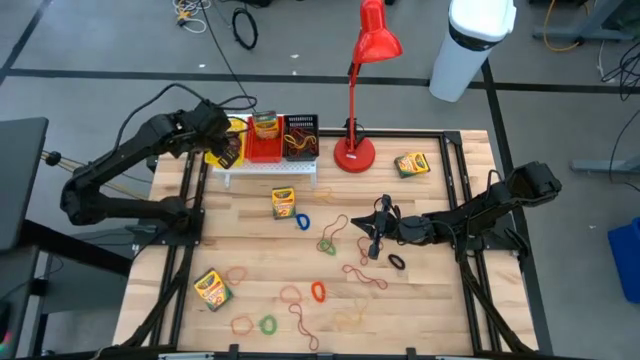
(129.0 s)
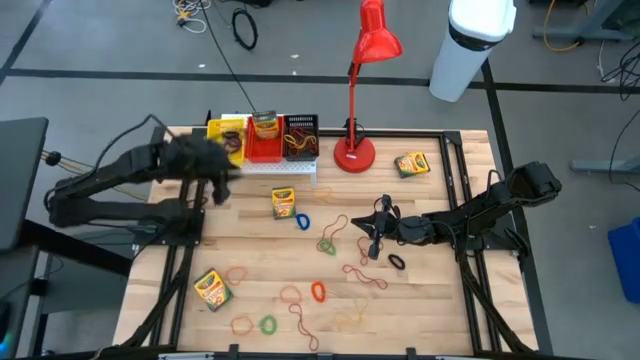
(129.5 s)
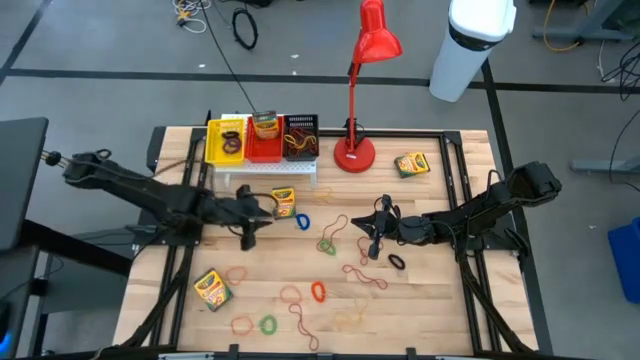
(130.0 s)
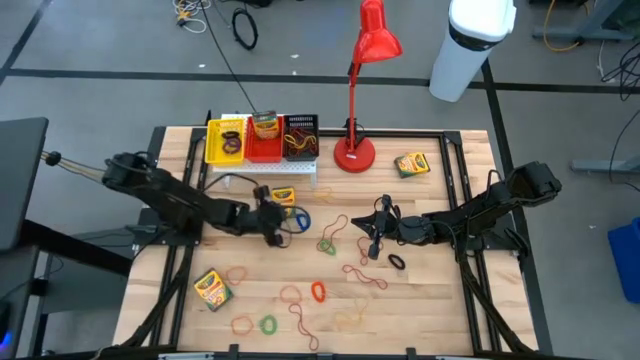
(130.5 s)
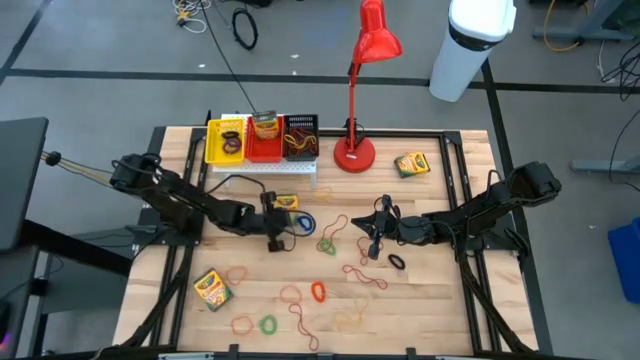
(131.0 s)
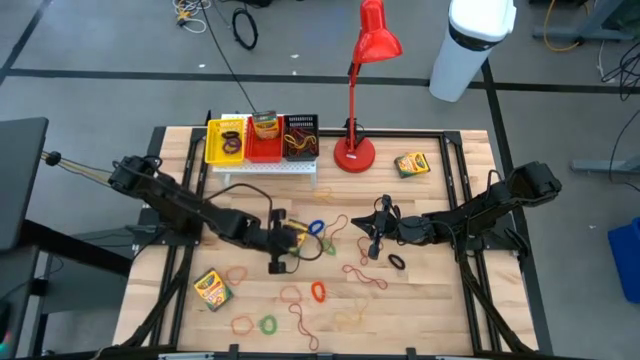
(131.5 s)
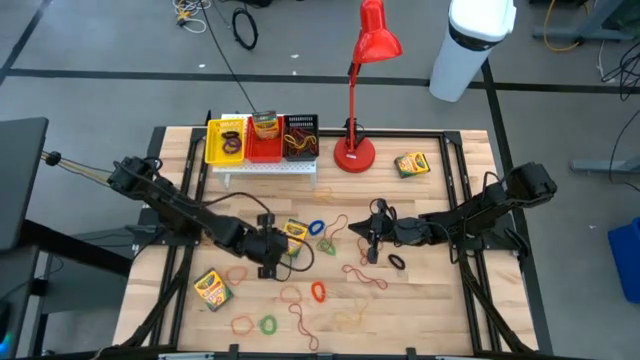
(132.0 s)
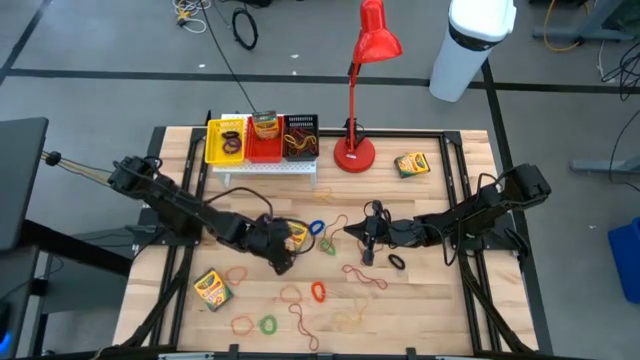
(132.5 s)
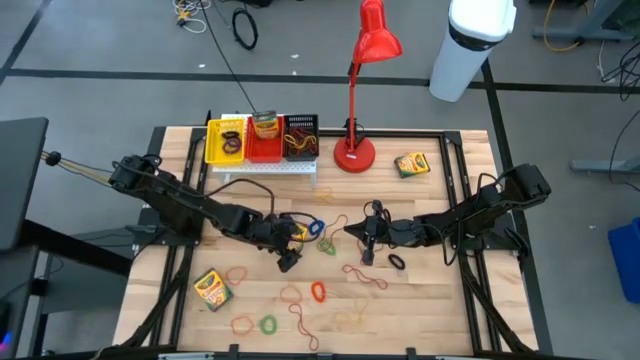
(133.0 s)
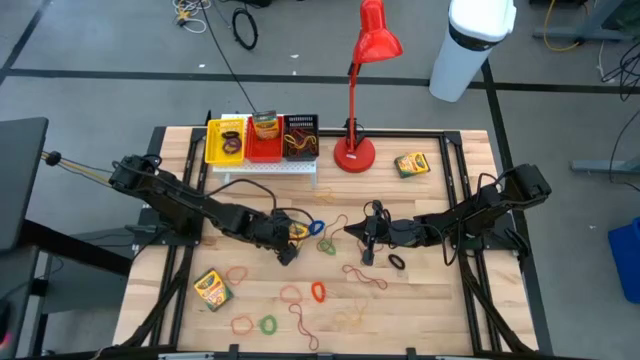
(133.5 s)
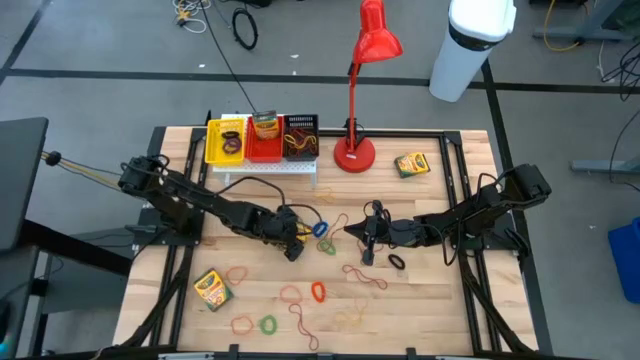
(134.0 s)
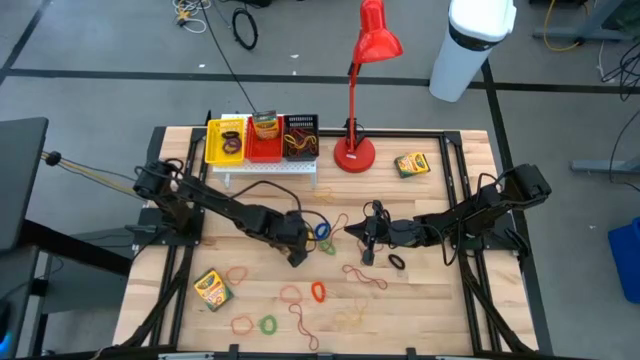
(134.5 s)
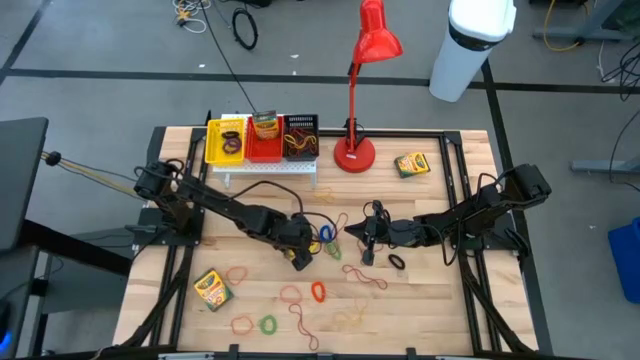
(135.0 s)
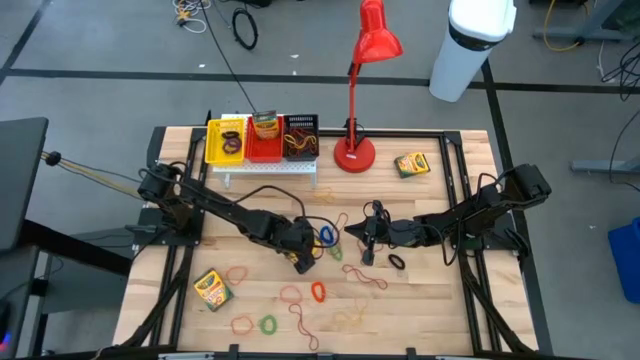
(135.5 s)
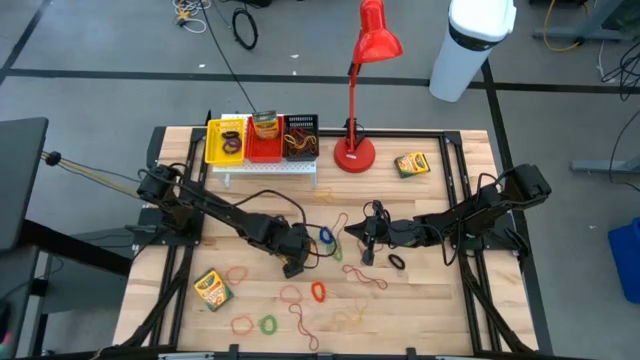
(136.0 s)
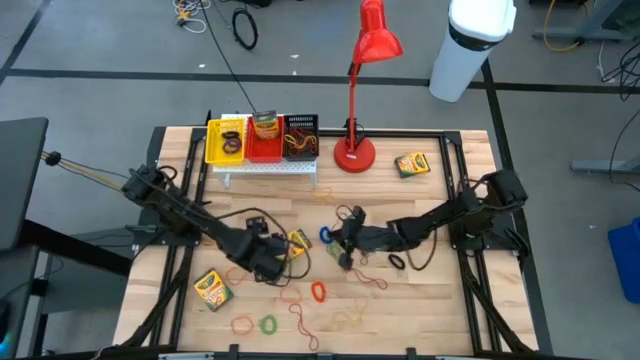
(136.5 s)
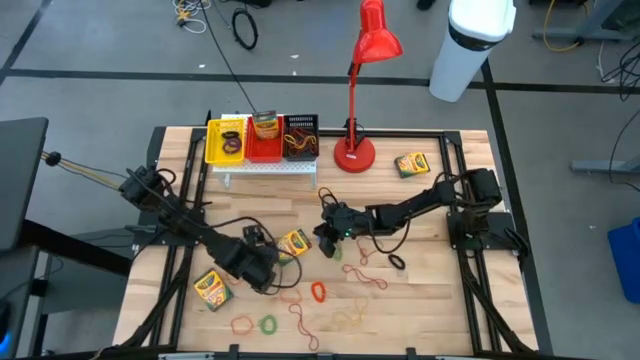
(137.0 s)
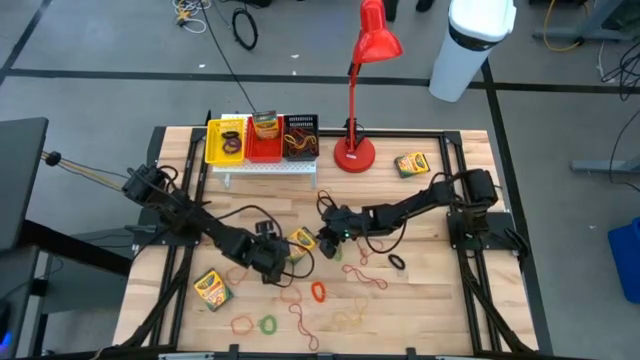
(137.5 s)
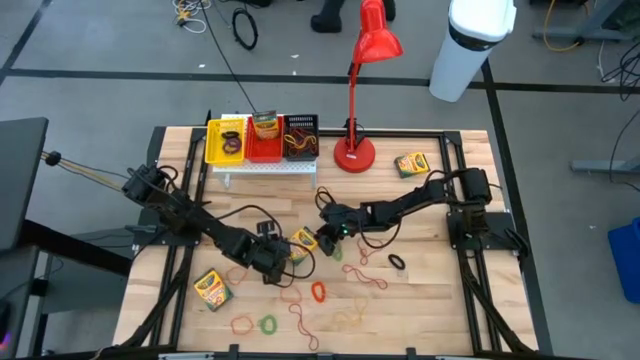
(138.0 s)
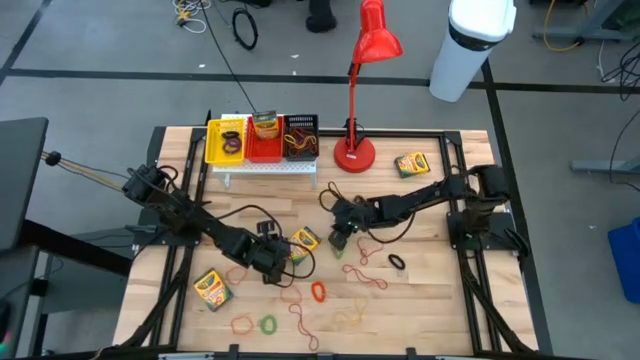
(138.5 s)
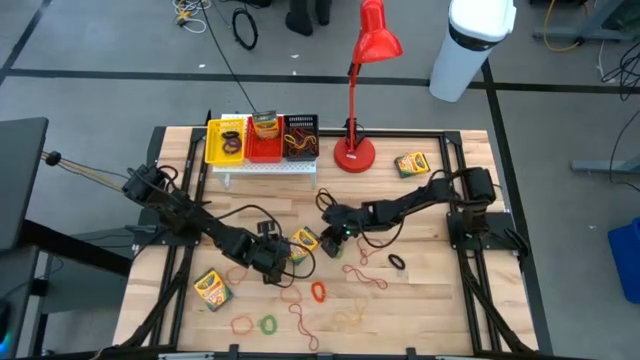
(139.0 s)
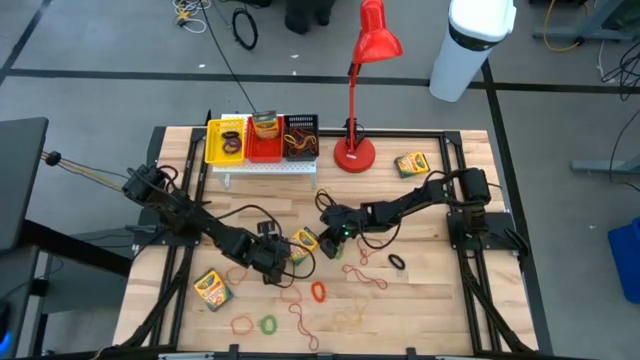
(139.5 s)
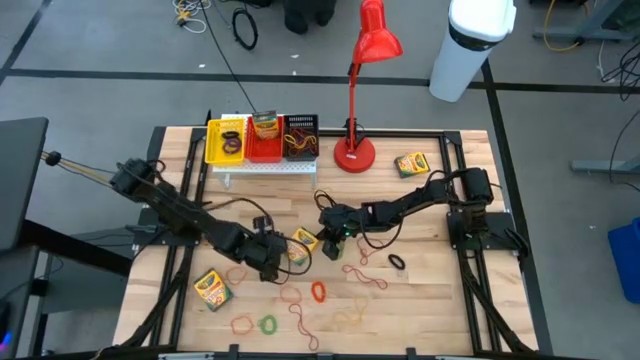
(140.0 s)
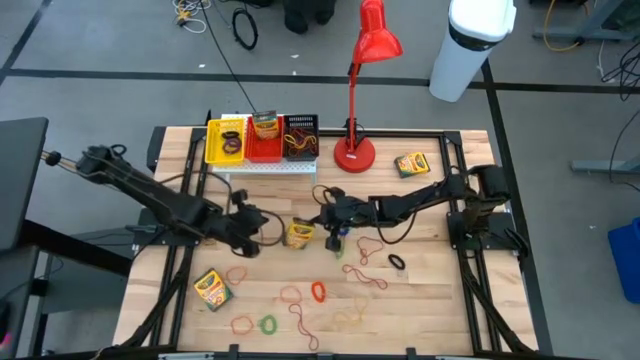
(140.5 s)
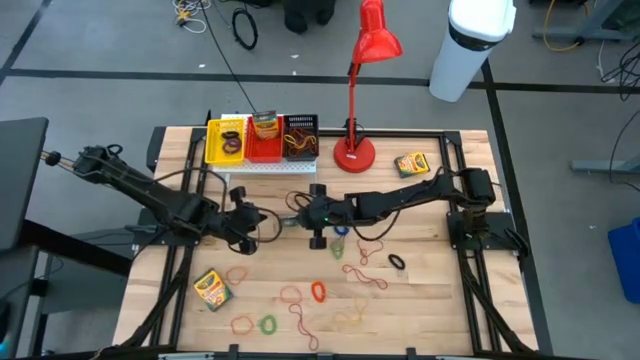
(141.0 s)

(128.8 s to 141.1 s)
Task: Pick & Place Office Desk Supplies
Put the crayon box into the red bin on the shelf

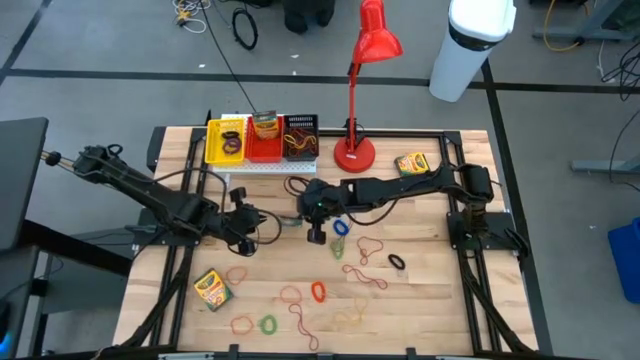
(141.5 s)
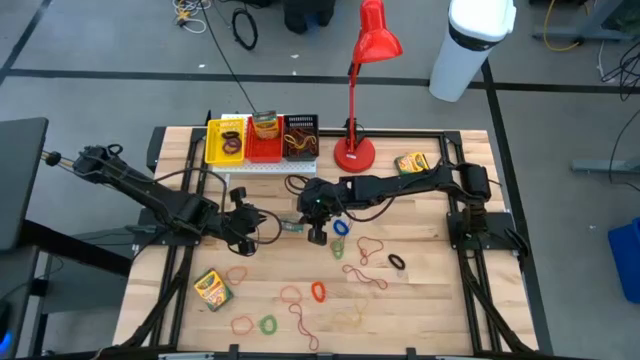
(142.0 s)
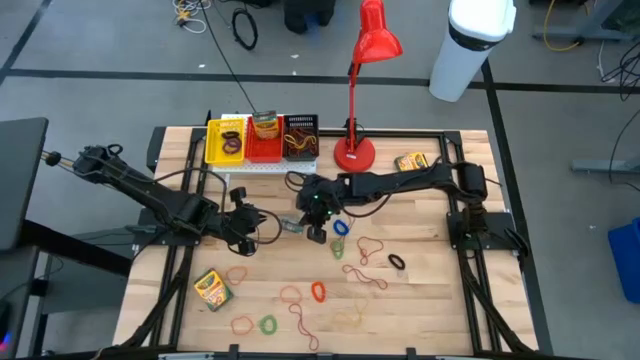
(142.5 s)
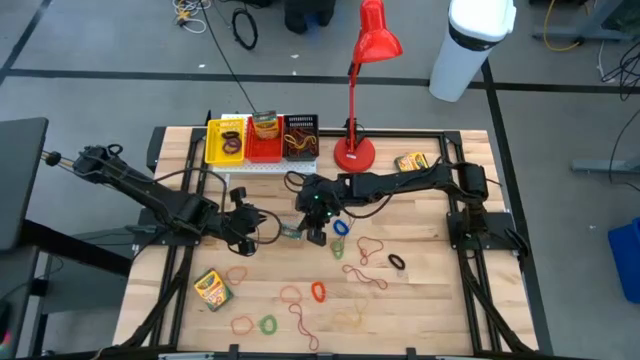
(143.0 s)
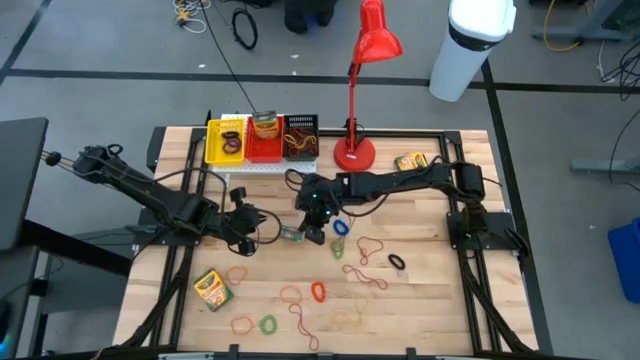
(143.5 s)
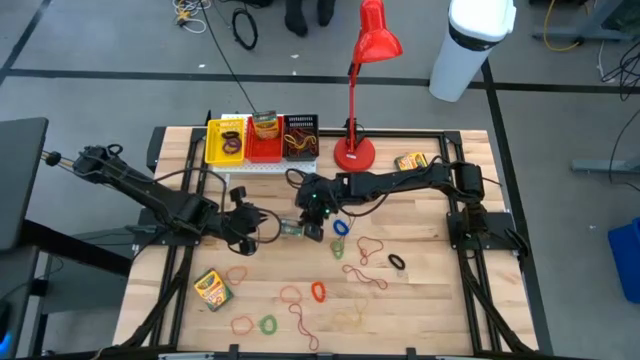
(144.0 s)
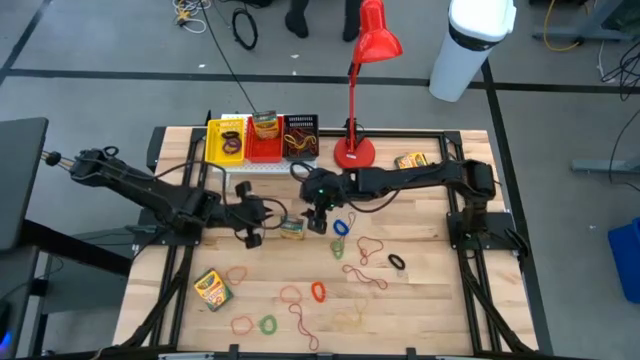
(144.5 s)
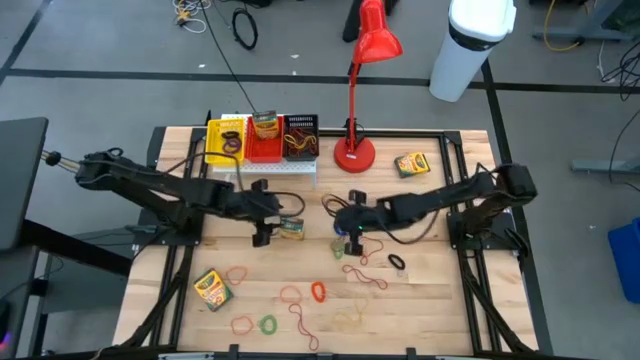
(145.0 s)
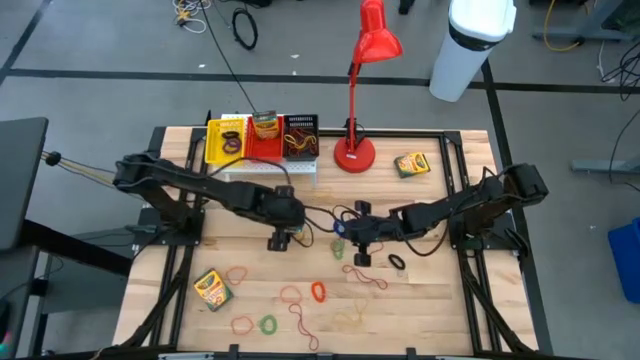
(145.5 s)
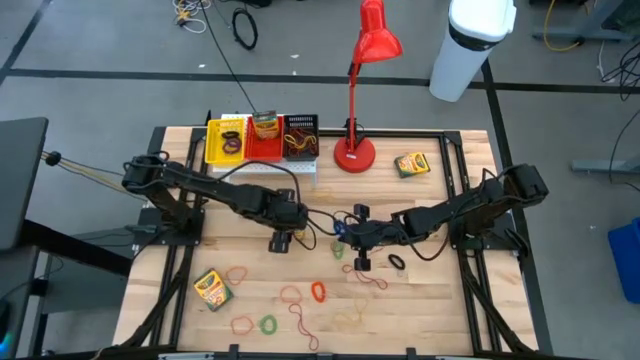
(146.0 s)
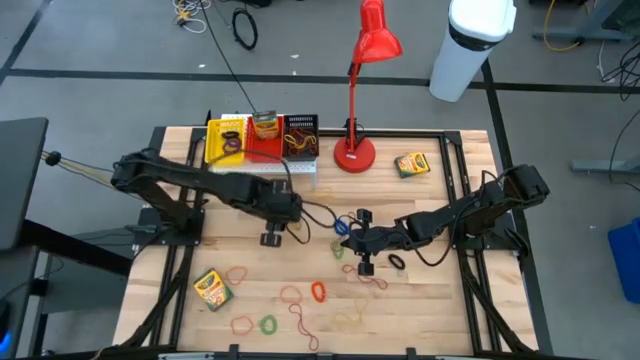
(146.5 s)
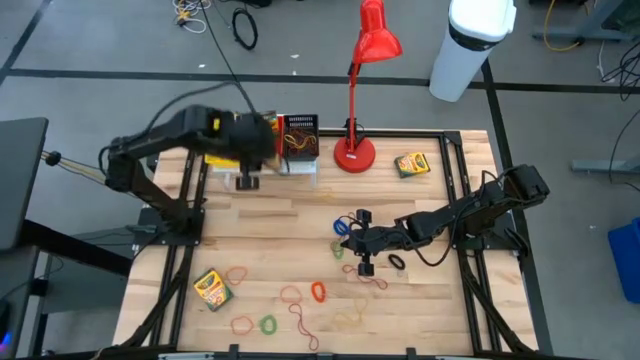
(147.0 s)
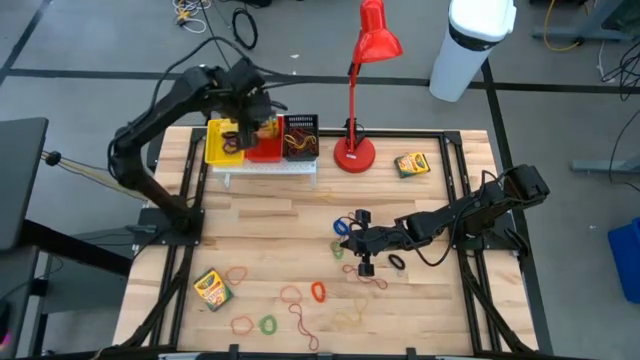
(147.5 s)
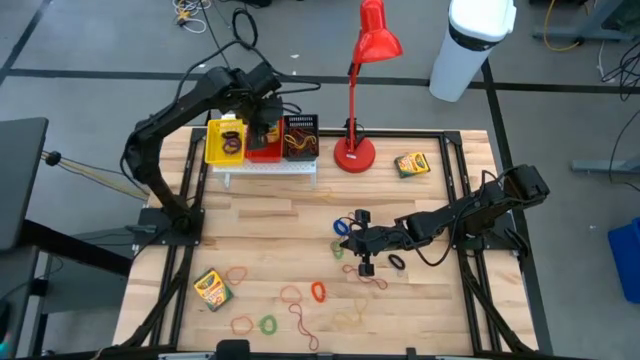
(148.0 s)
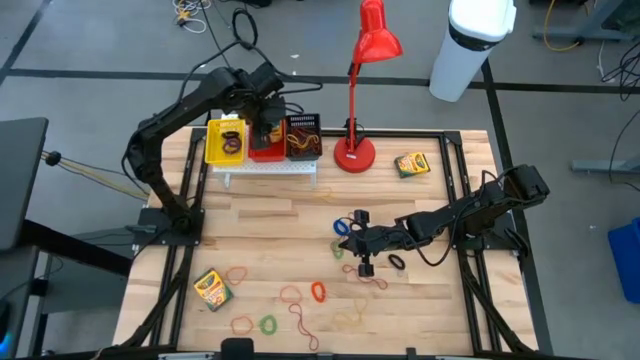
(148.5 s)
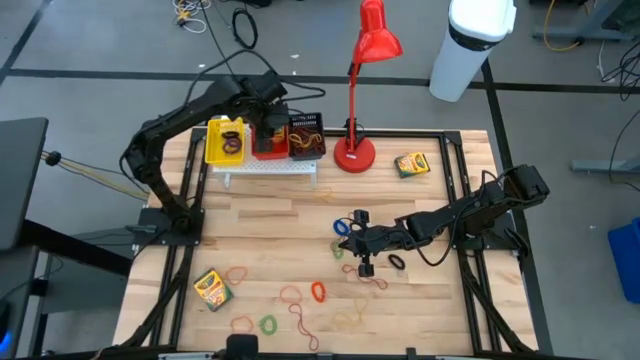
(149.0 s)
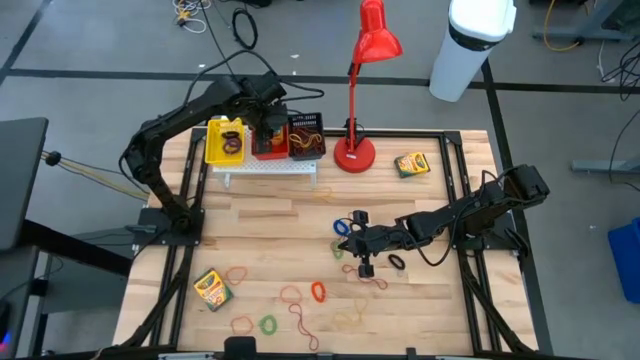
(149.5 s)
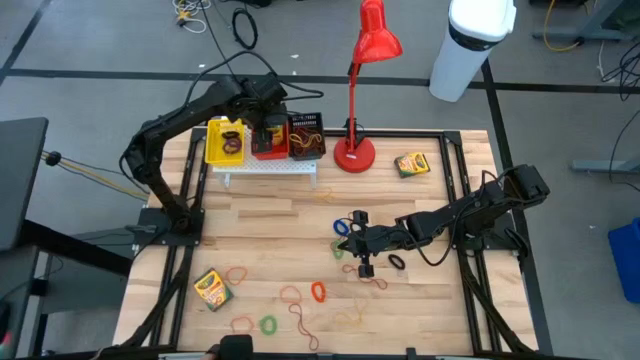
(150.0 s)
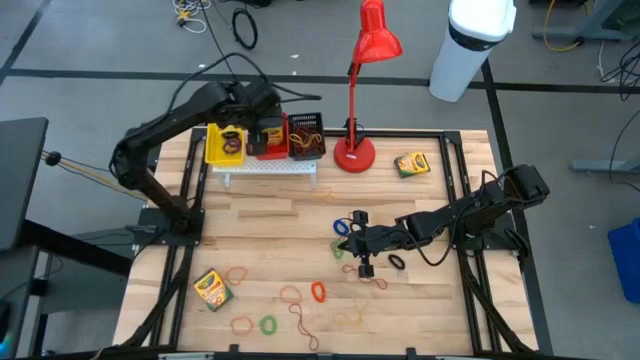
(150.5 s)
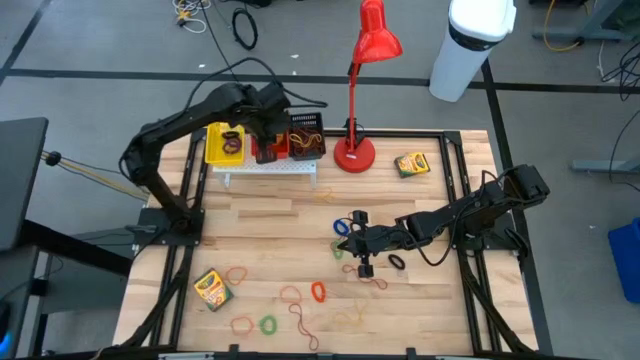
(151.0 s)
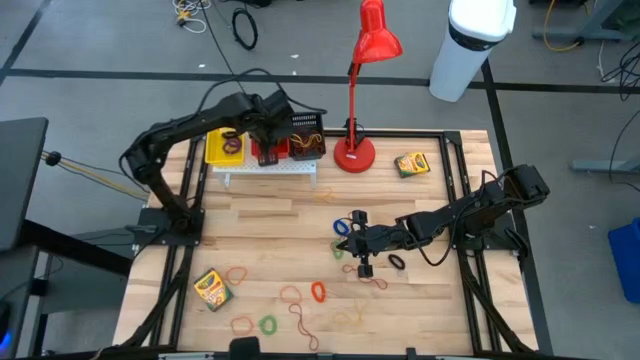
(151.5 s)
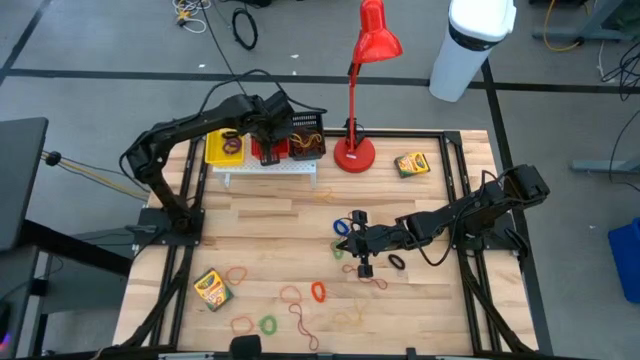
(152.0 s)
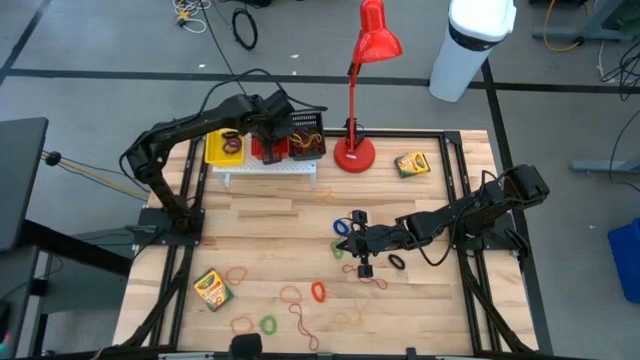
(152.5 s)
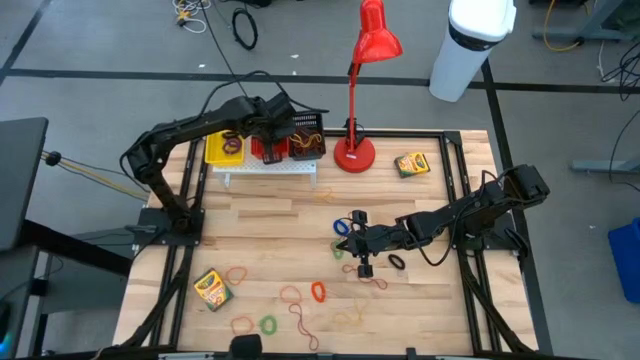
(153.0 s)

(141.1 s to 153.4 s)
Put the crayon box into the red bin on the shelf
